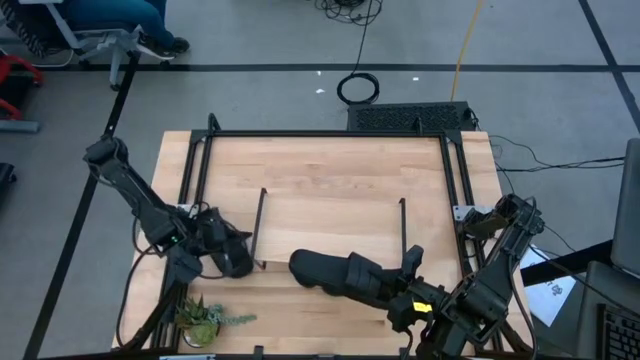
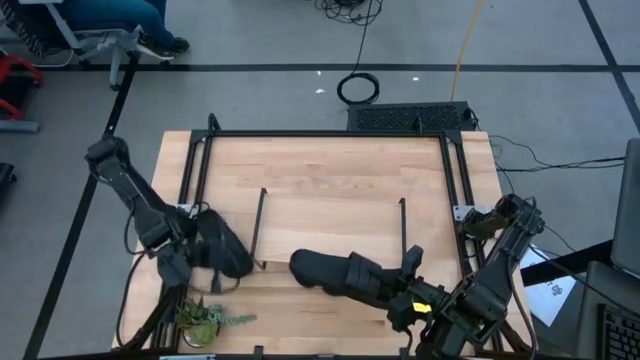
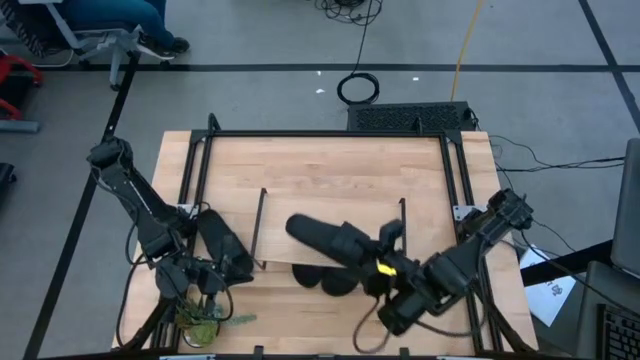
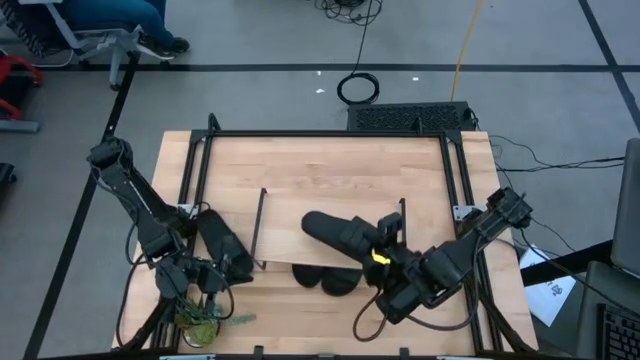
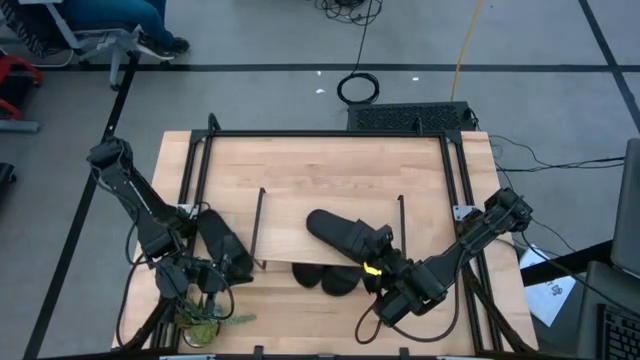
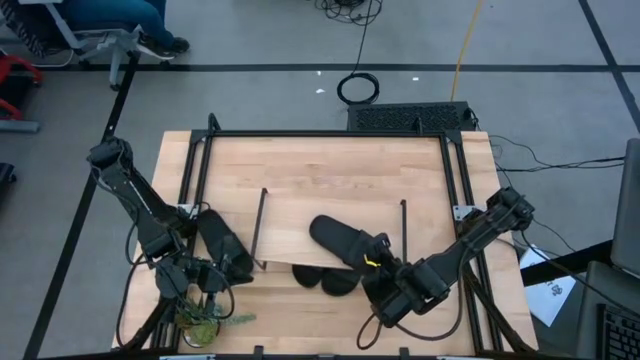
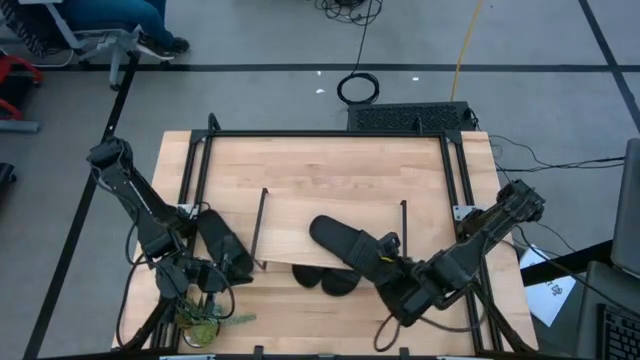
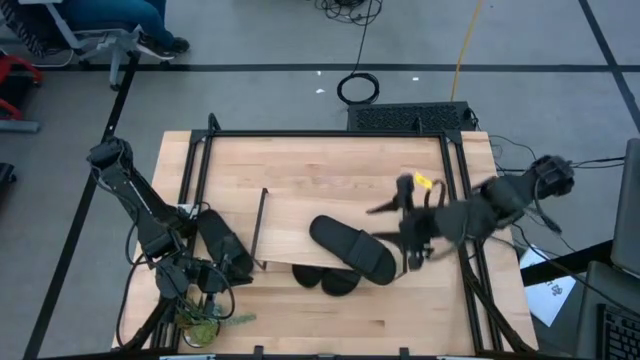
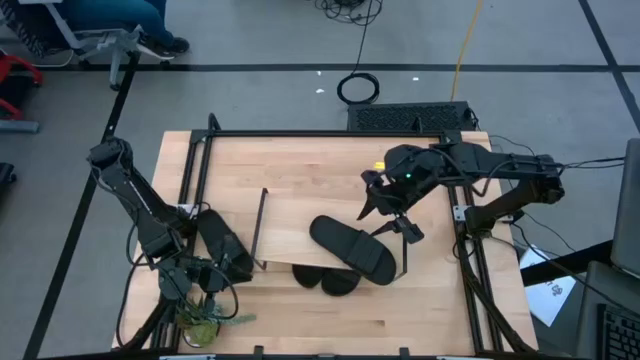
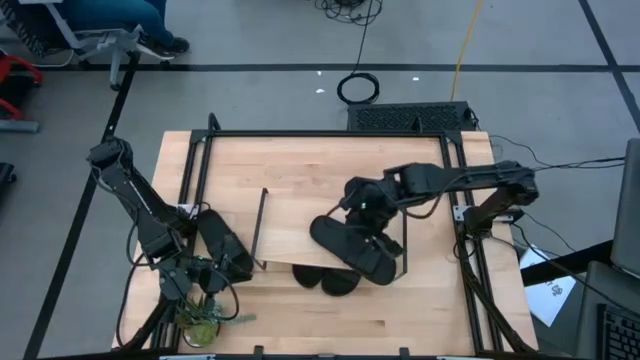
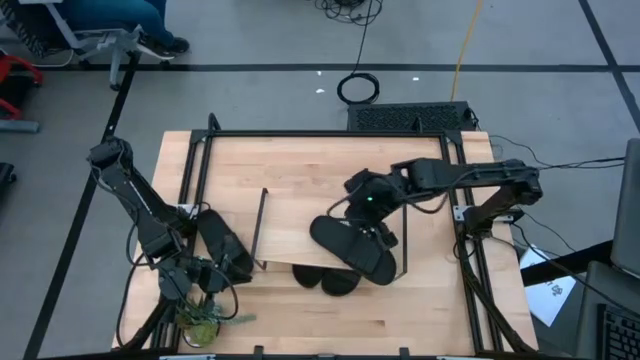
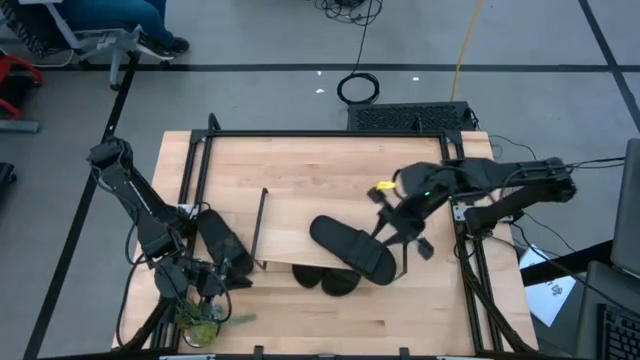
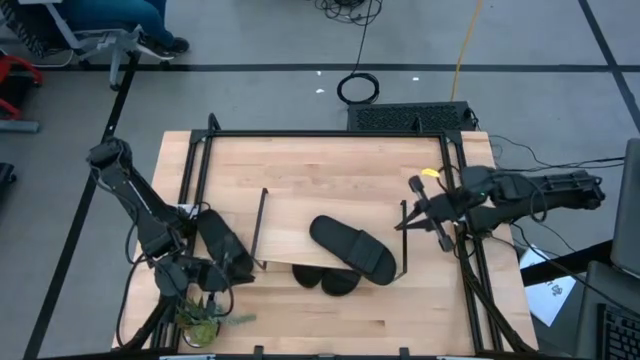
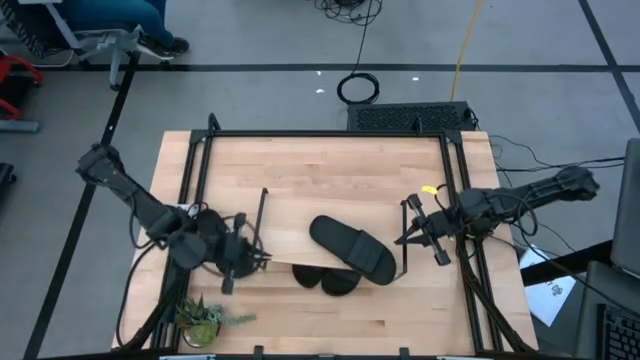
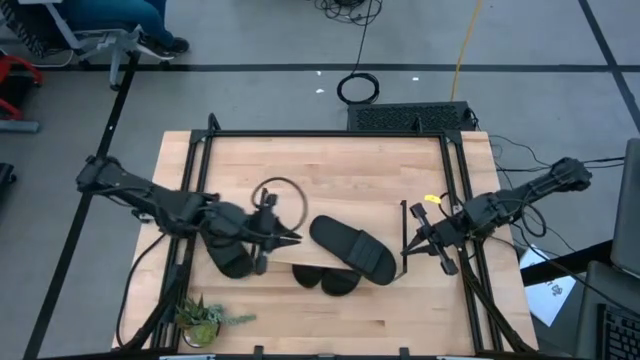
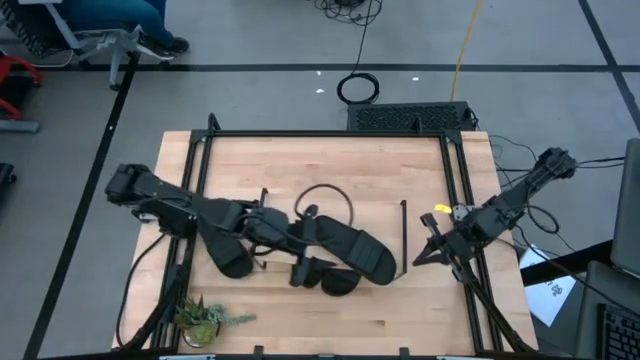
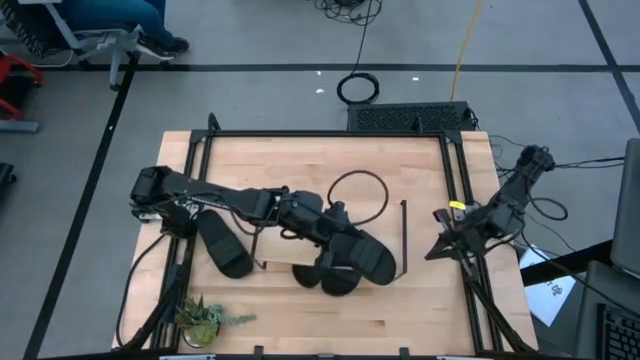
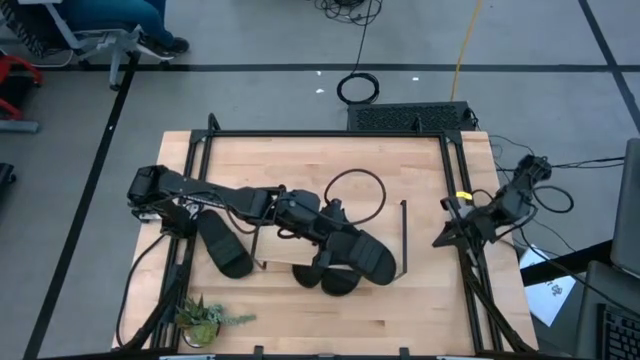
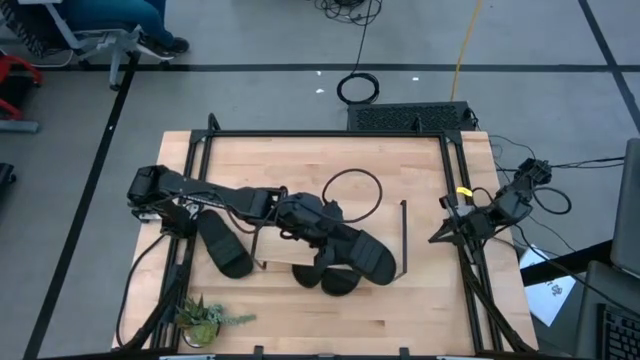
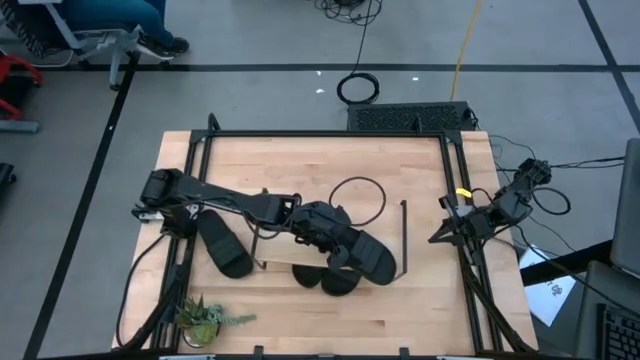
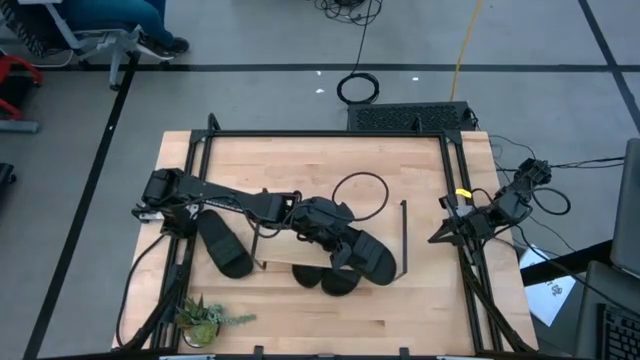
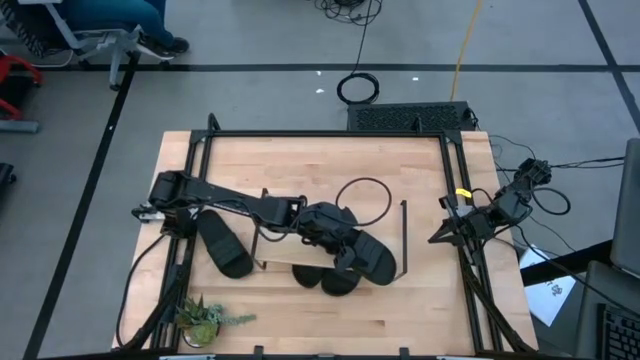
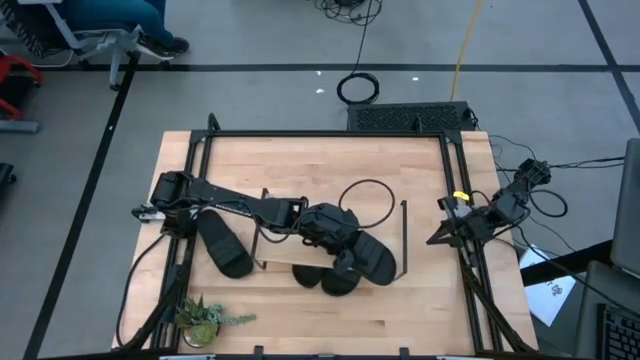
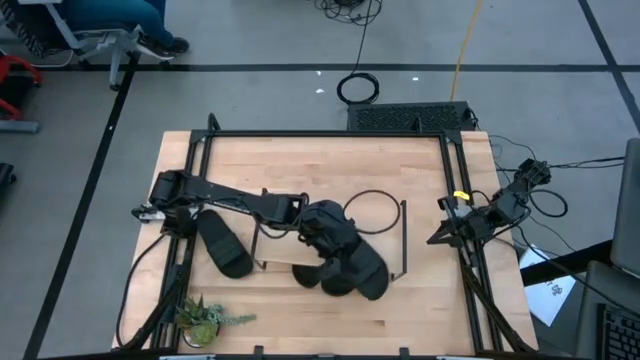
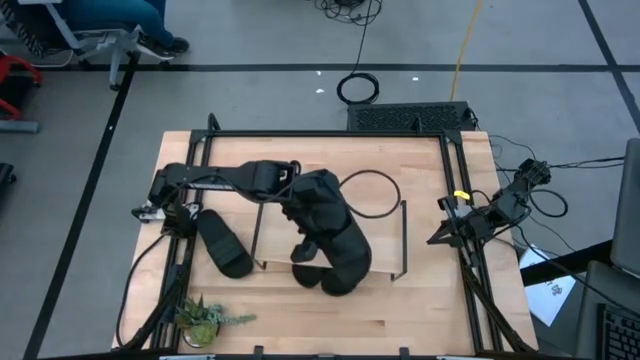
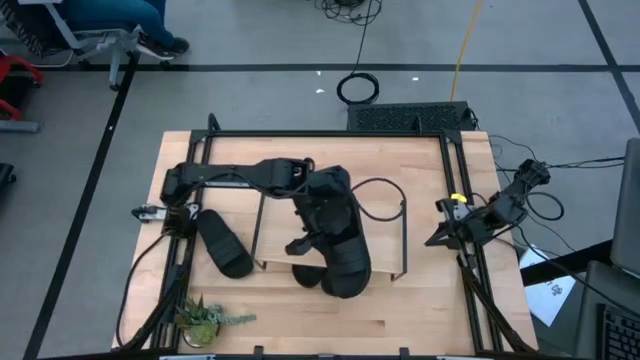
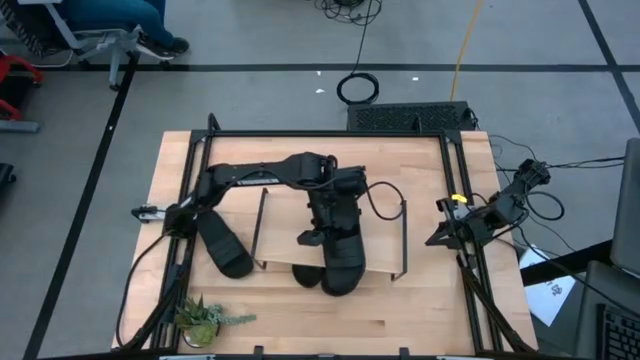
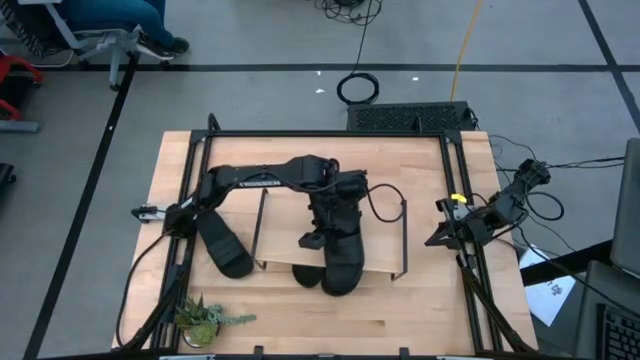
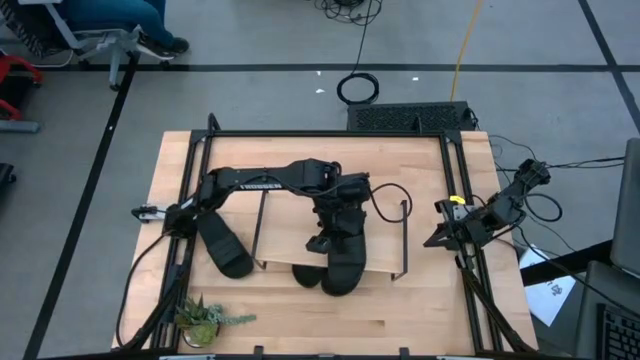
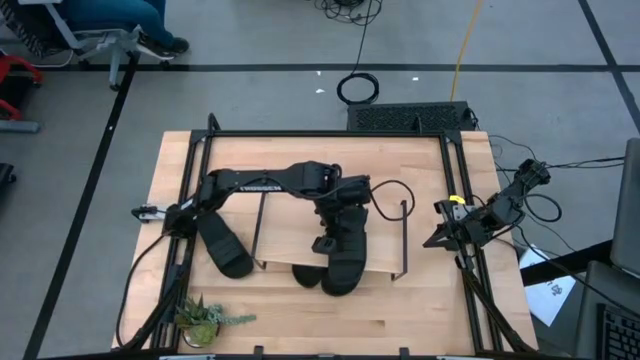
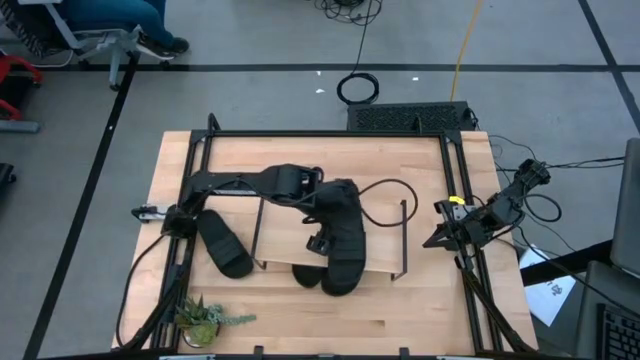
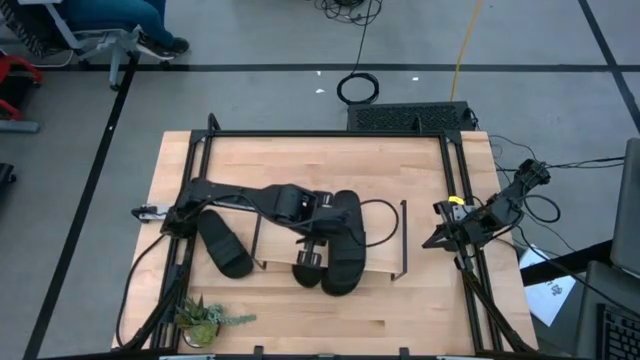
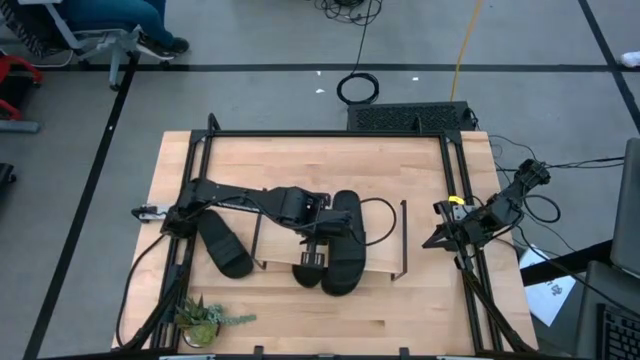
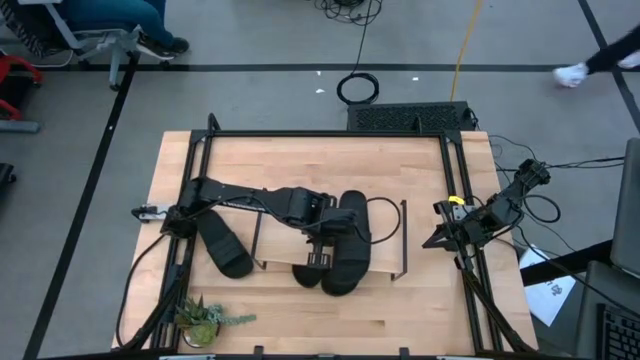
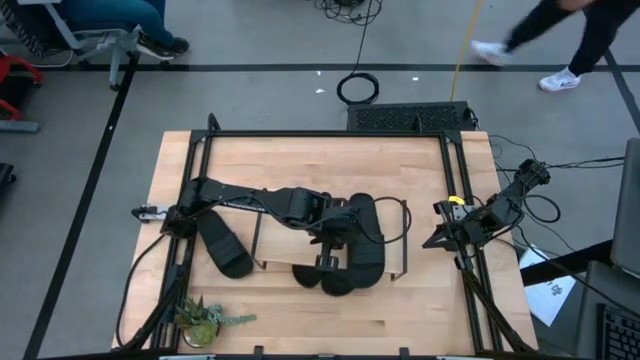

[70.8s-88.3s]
Task: Pick and place slides into the shelf
Put the right black slipper on the shelf

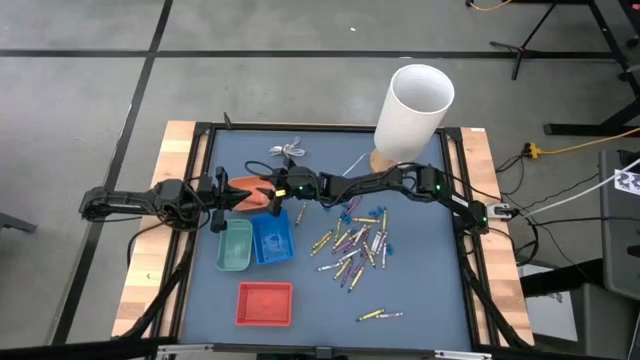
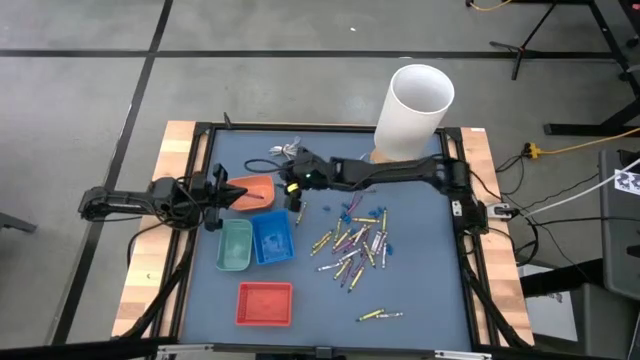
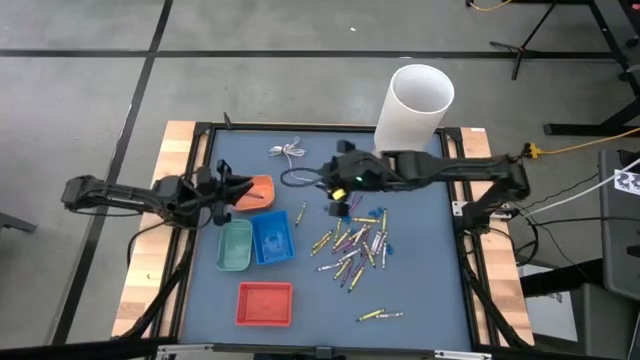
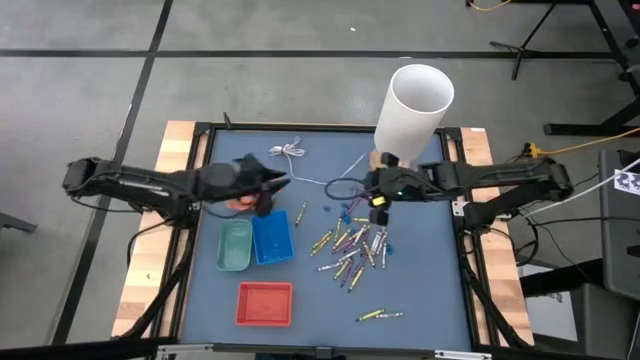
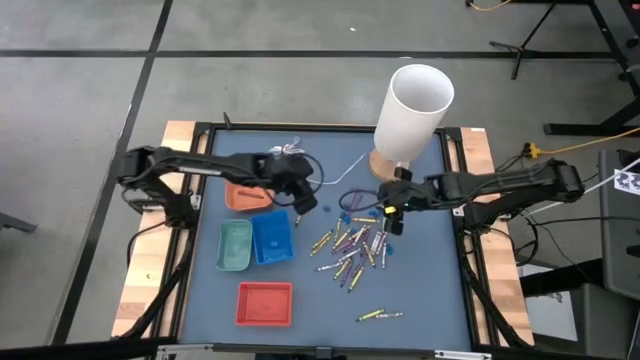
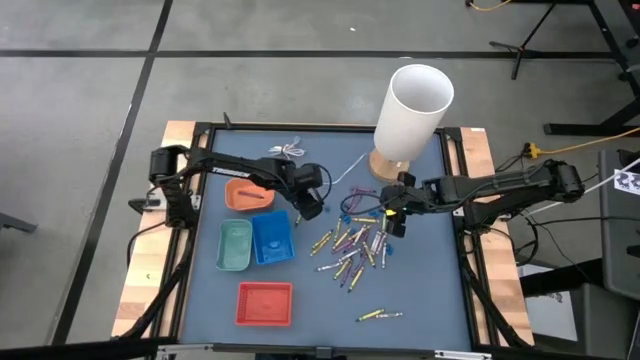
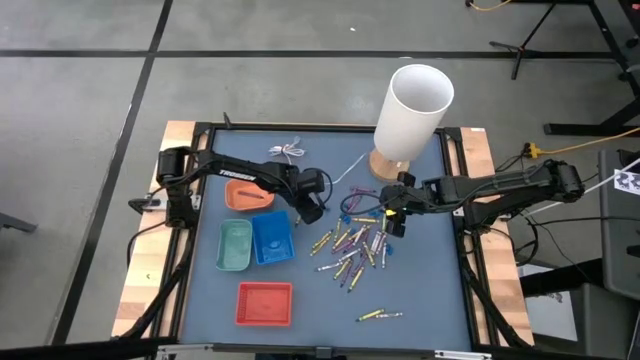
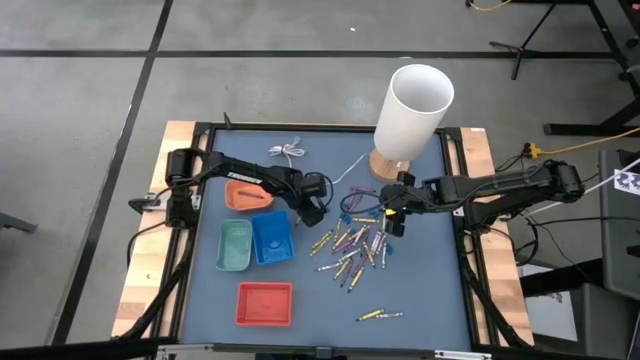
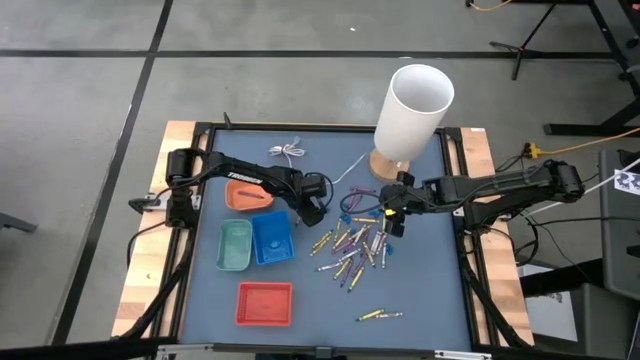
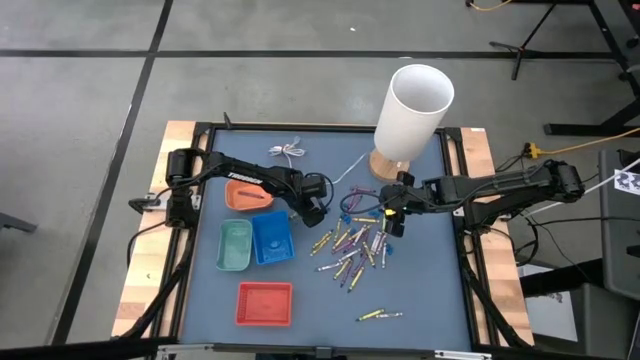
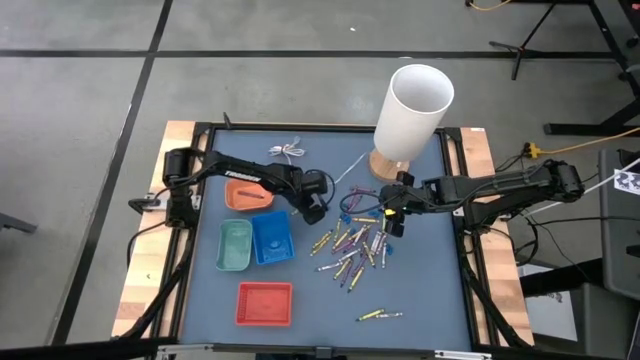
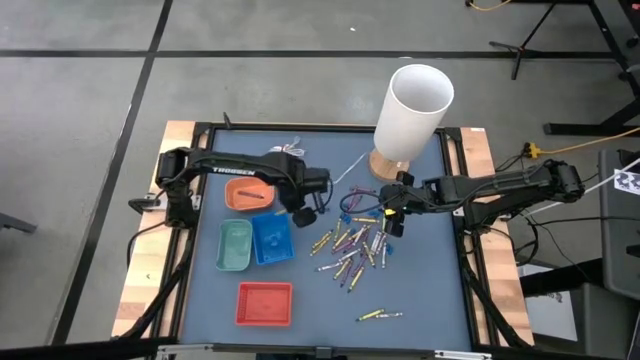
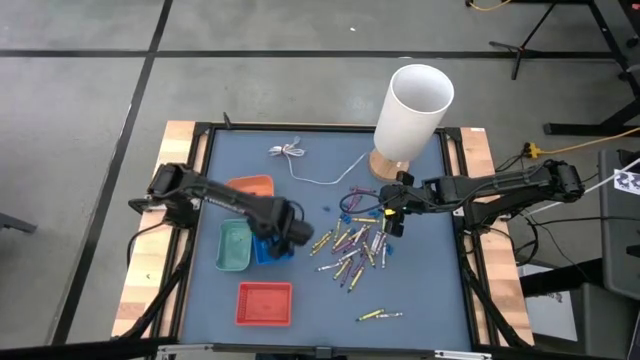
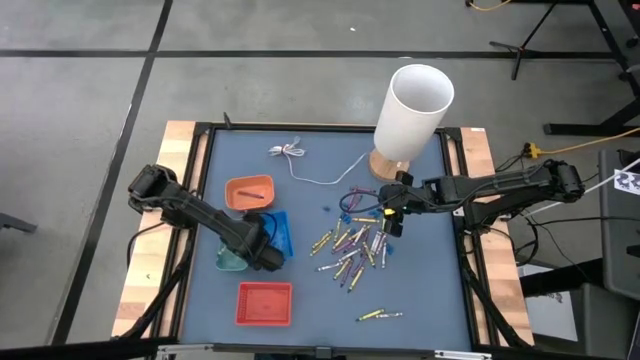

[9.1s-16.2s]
Task: Sort crayons
Put the green crayon into the blue green bin
